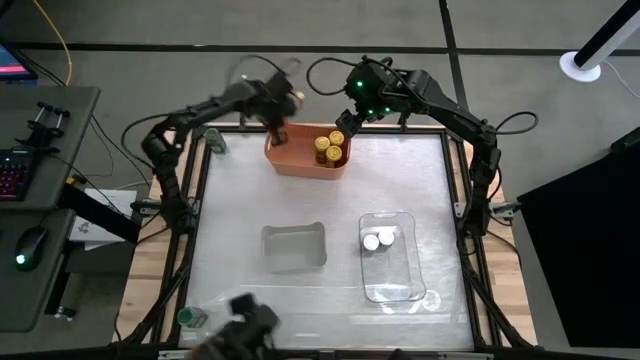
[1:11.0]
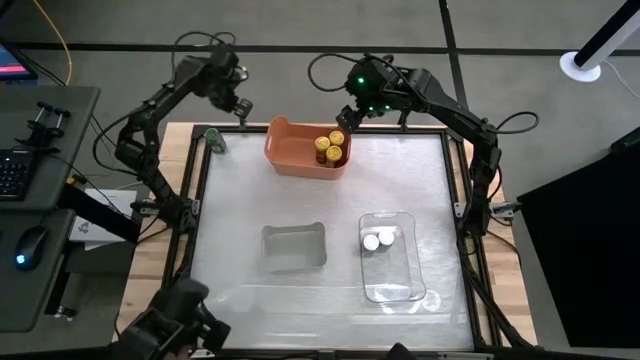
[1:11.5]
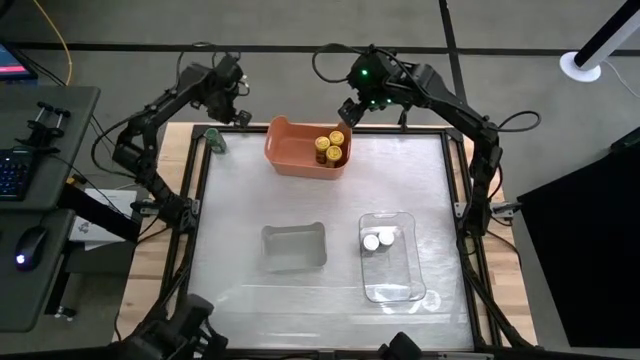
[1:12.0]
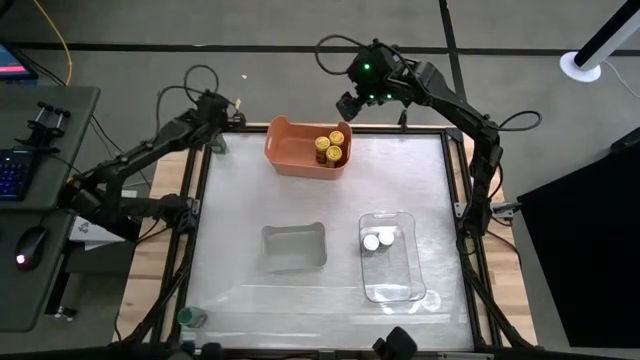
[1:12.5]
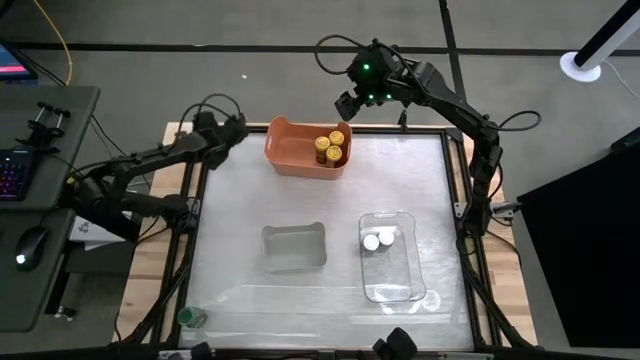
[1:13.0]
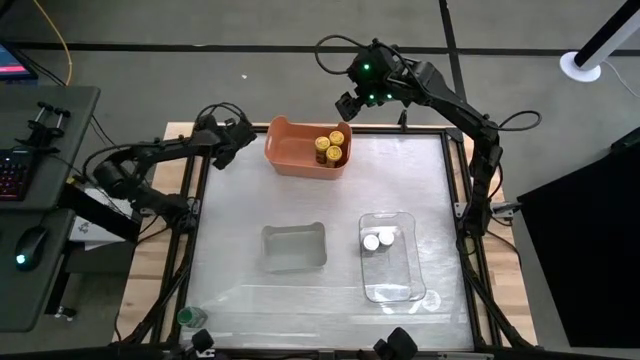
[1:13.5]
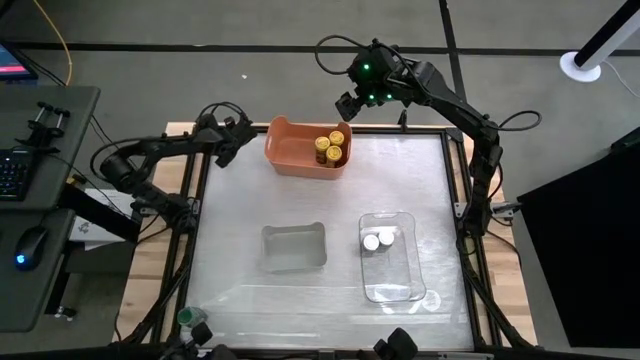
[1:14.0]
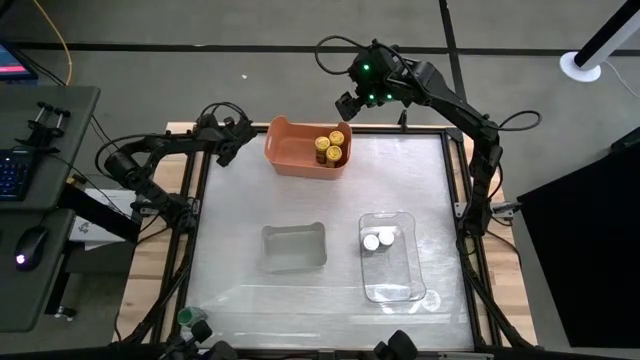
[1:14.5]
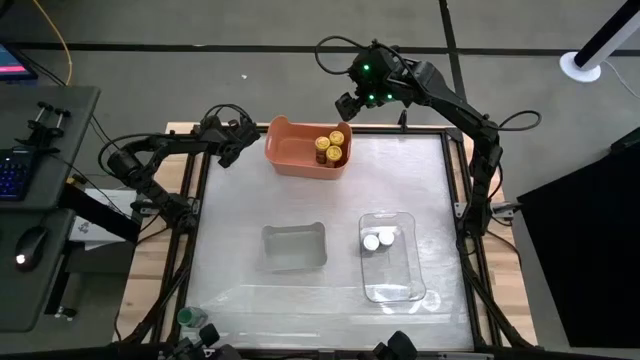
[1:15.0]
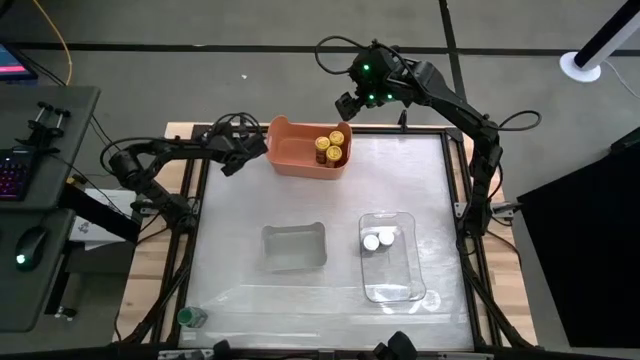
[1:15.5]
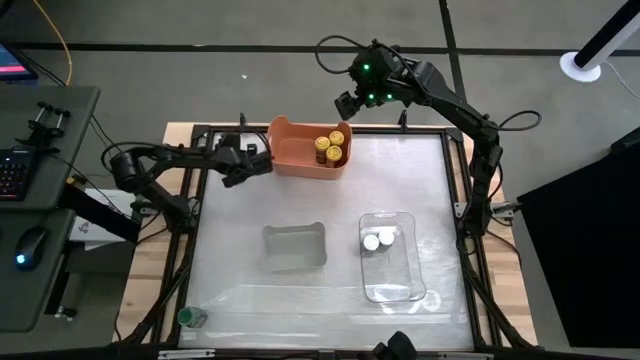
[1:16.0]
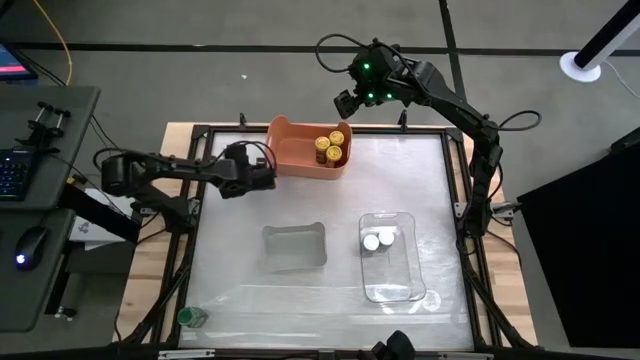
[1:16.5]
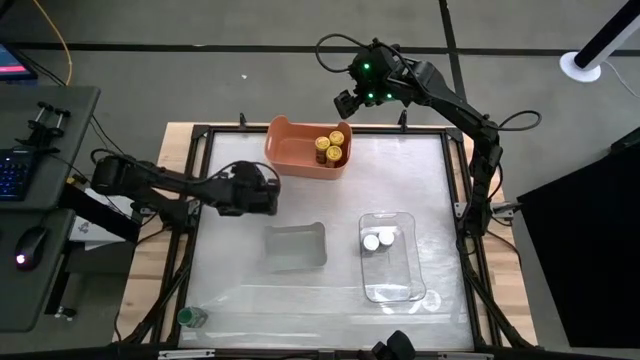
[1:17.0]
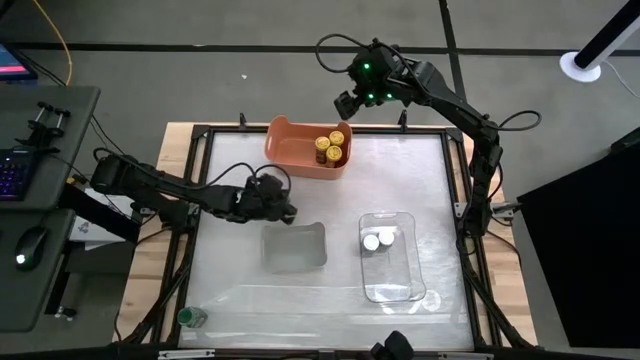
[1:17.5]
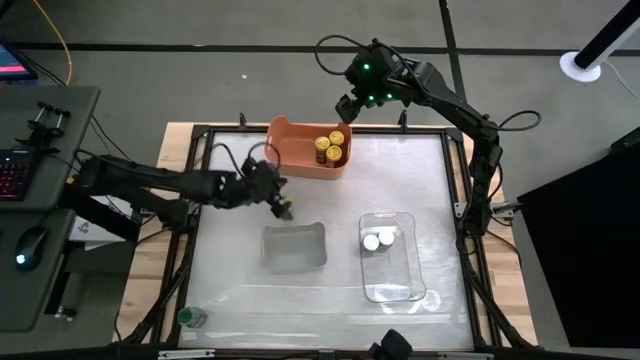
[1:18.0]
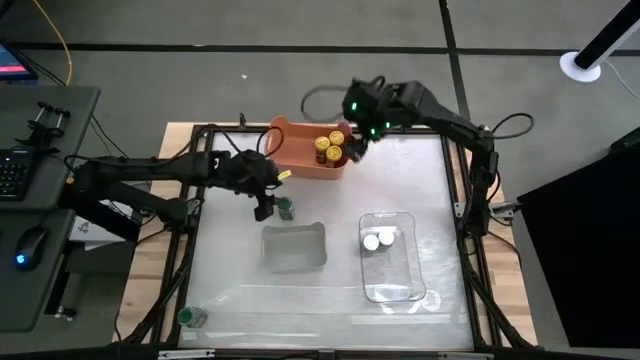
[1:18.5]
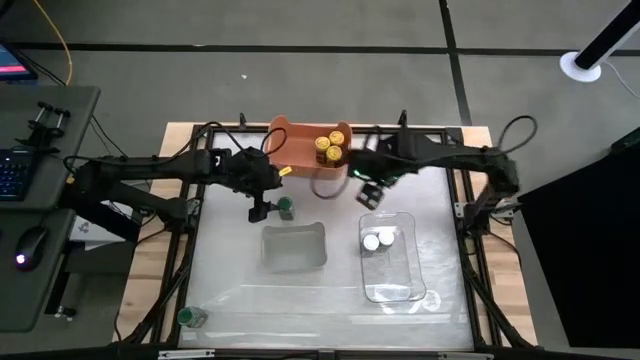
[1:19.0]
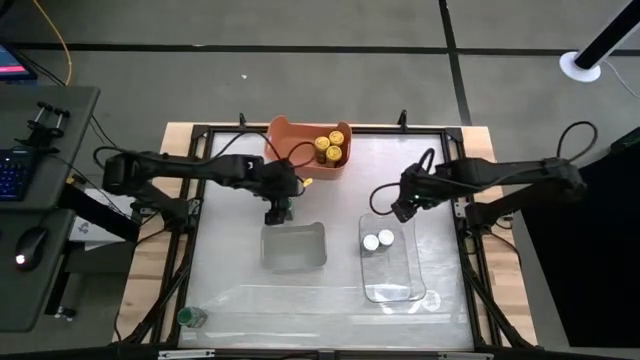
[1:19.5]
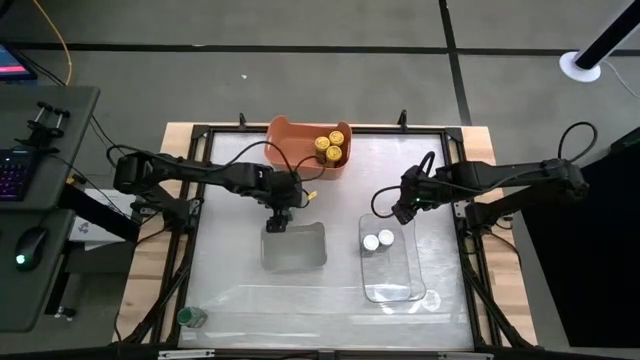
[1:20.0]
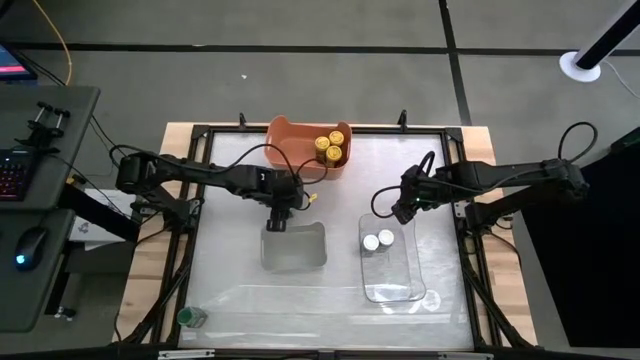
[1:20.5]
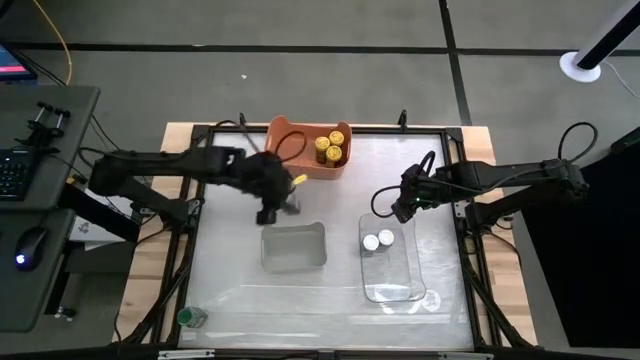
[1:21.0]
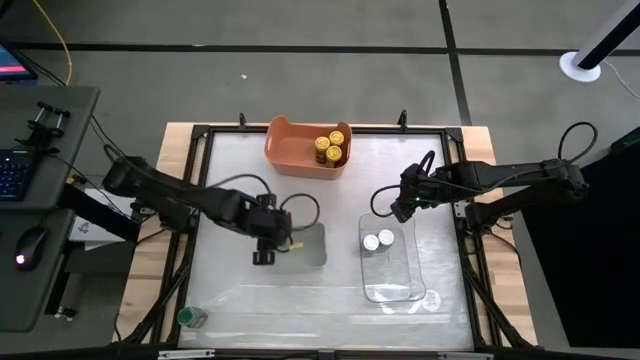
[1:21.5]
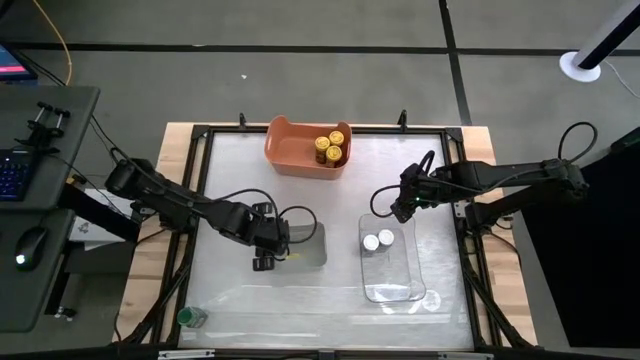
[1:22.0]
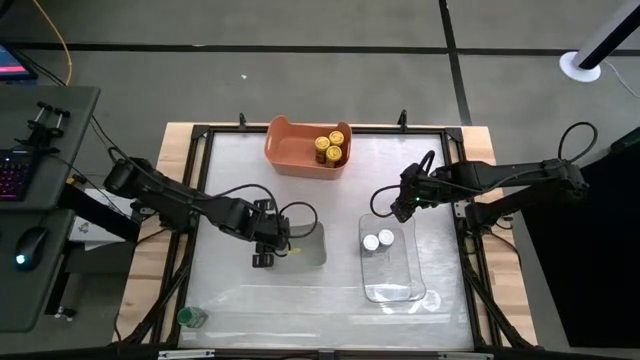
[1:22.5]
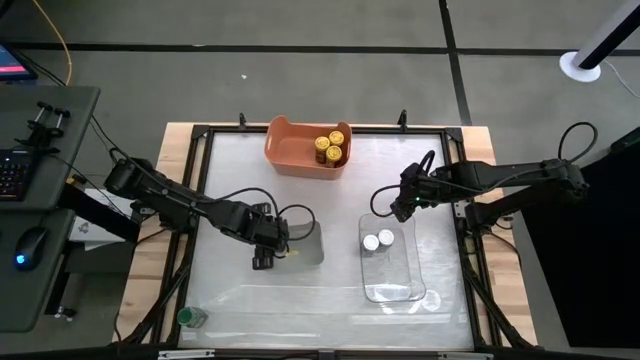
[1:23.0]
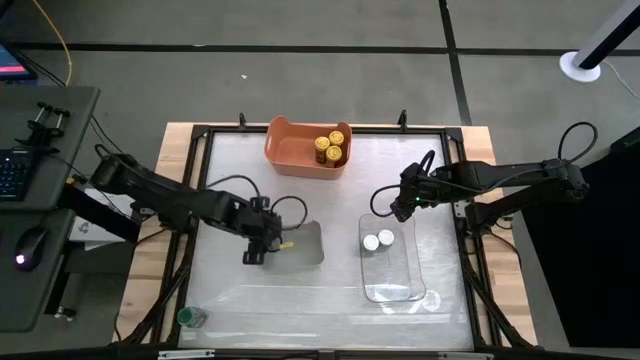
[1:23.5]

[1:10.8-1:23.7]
Task: Sort spices by type
Put the top green seasoning bottle into the gray bin

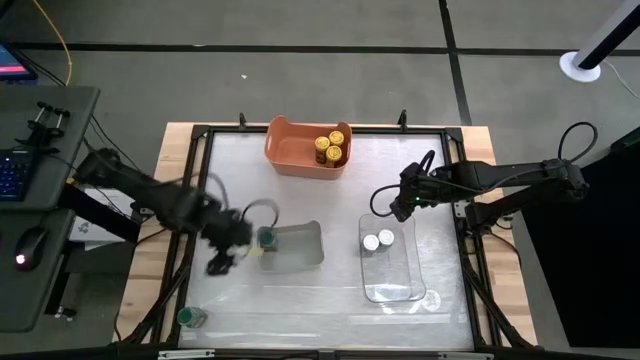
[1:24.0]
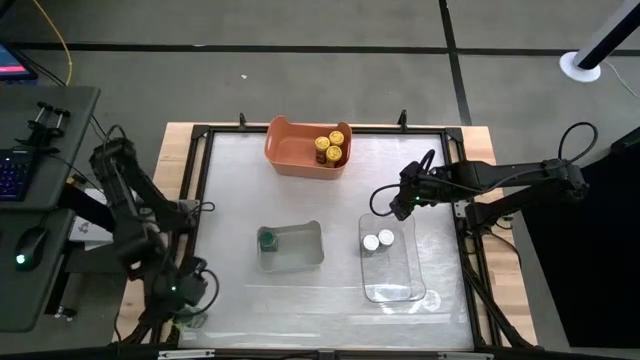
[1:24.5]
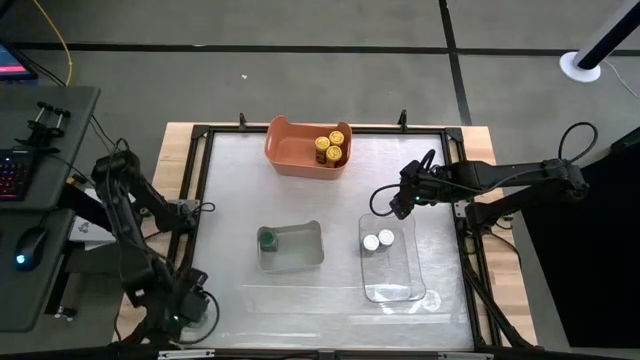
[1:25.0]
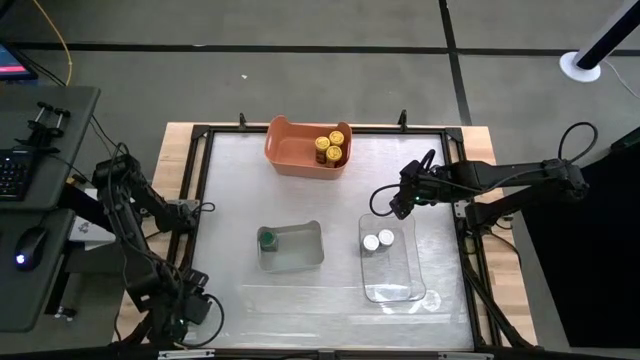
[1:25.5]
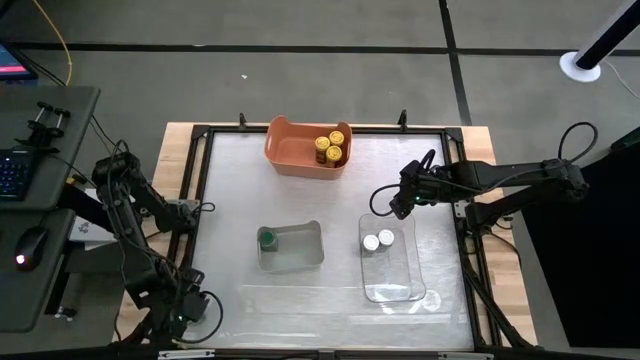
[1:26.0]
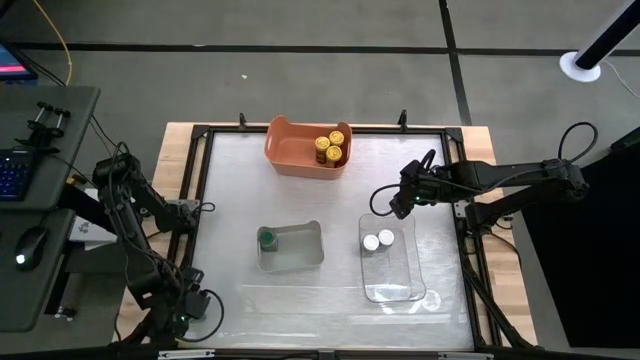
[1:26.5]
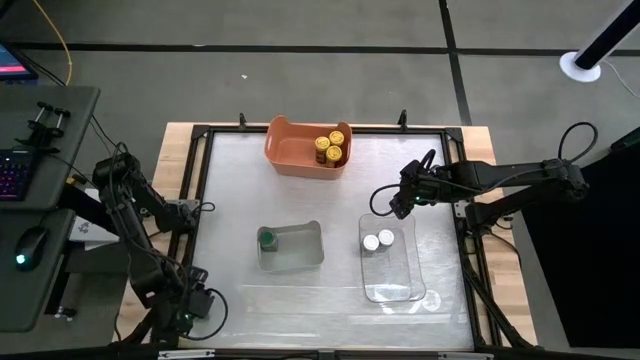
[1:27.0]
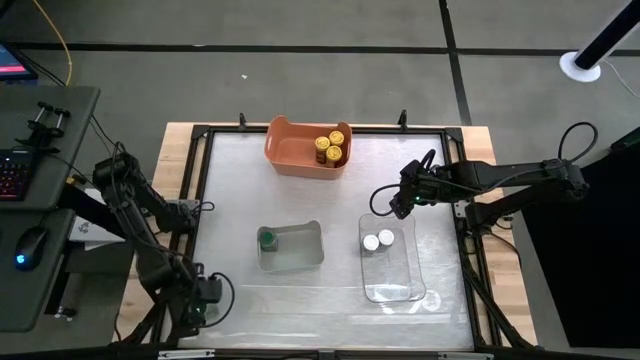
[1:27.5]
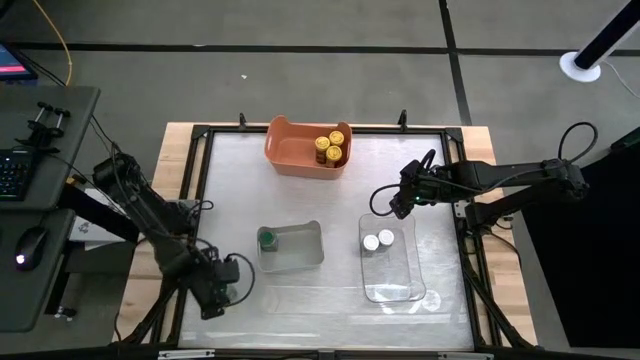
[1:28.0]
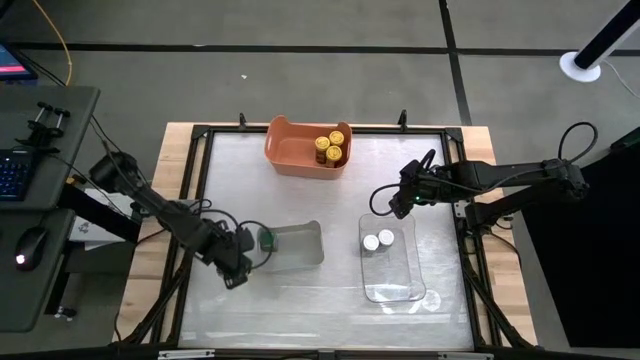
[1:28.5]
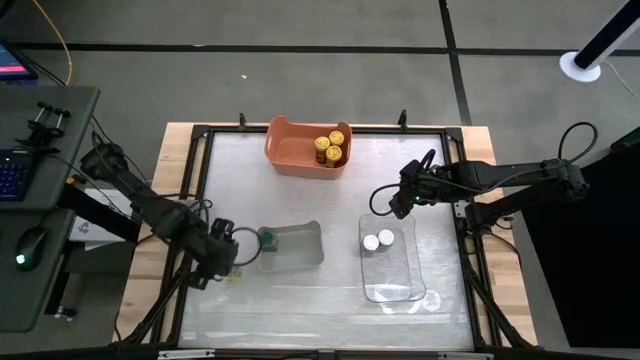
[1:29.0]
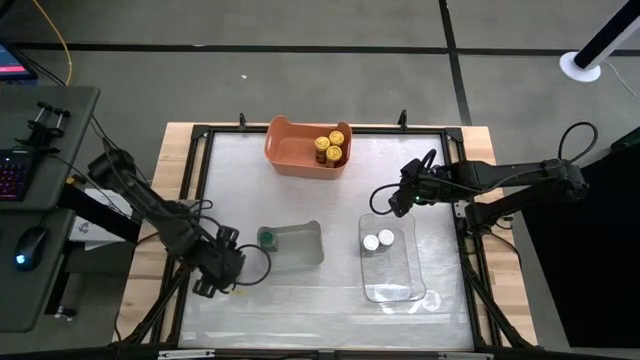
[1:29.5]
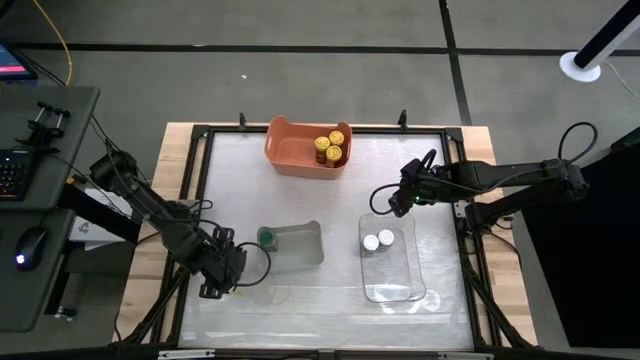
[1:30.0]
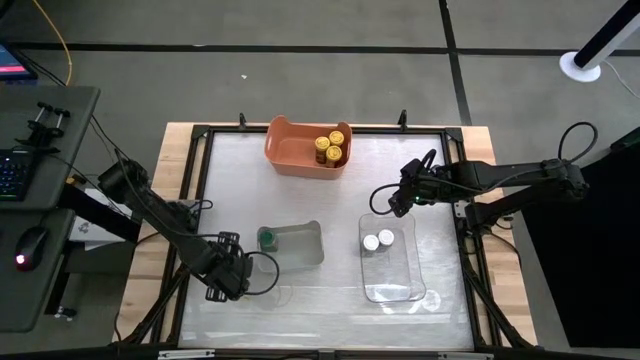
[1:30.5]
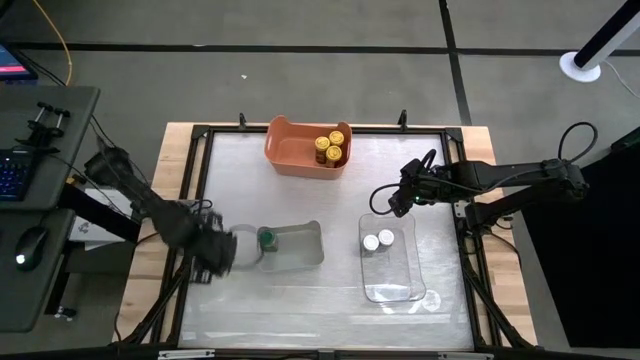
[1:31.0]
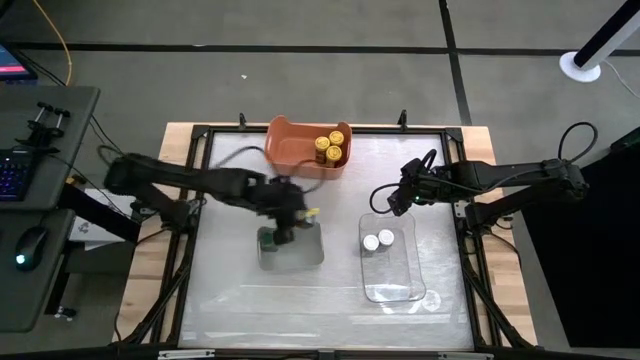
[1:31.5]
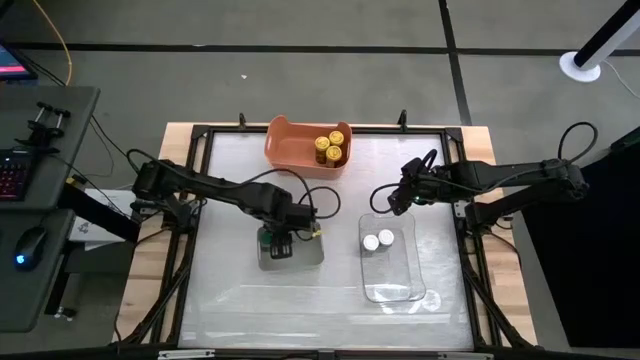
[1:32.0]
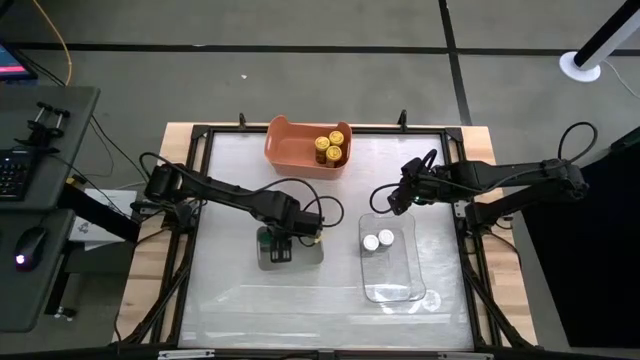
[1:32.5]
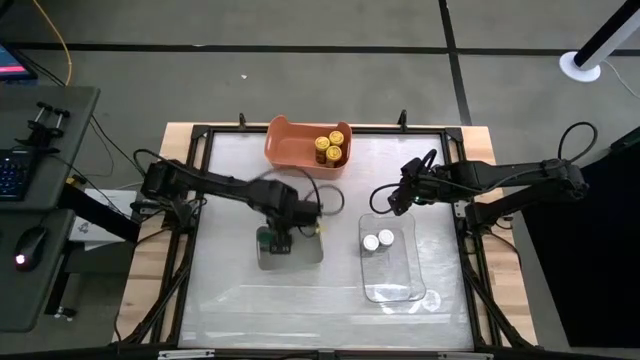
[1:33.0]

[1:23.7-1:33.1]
Put the green seasoning bottle into the gray bin
